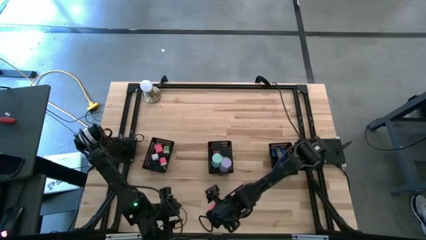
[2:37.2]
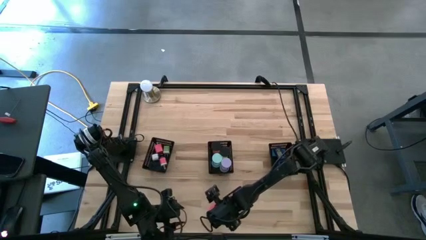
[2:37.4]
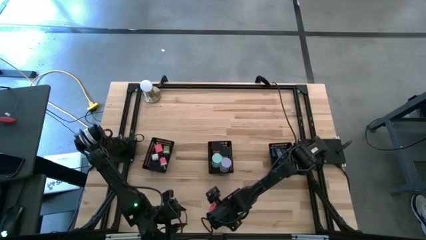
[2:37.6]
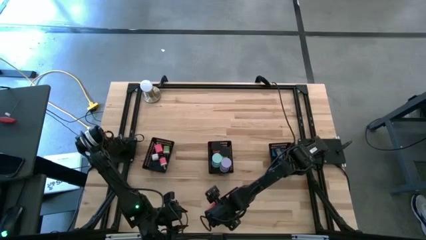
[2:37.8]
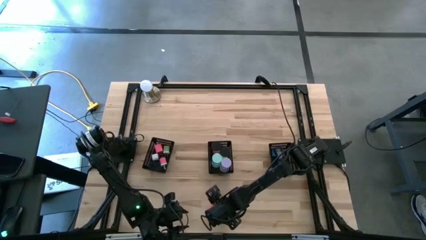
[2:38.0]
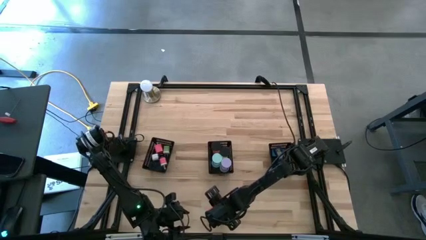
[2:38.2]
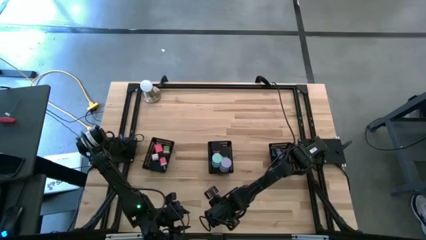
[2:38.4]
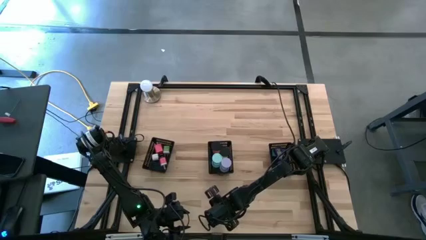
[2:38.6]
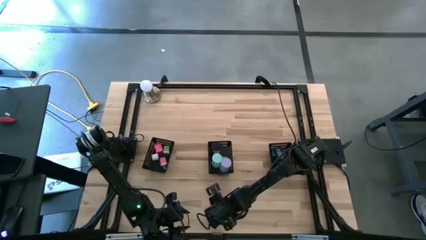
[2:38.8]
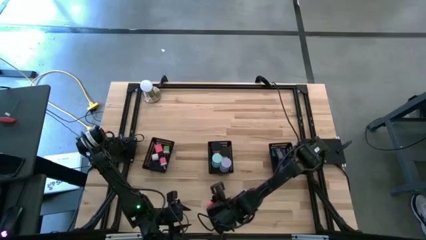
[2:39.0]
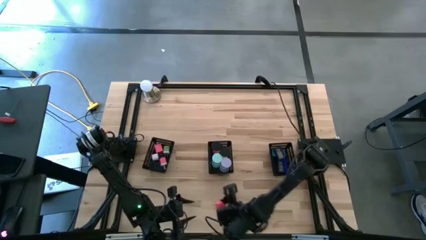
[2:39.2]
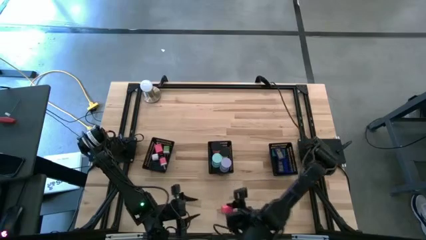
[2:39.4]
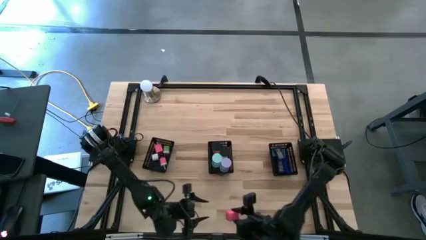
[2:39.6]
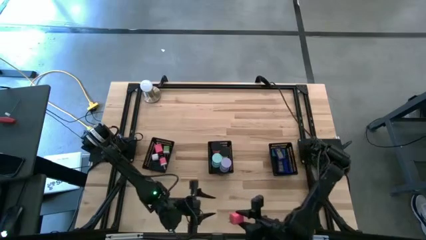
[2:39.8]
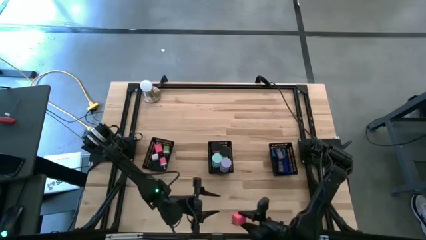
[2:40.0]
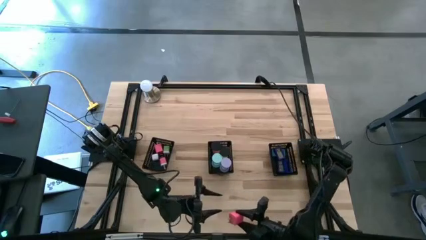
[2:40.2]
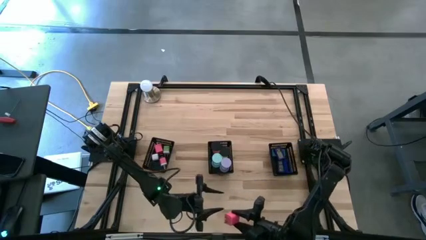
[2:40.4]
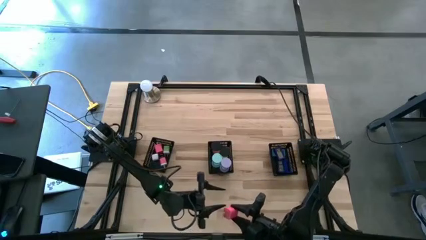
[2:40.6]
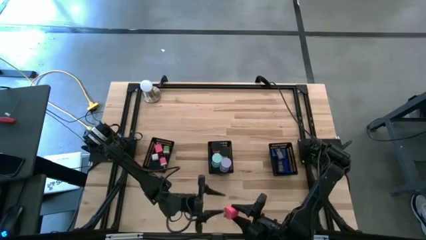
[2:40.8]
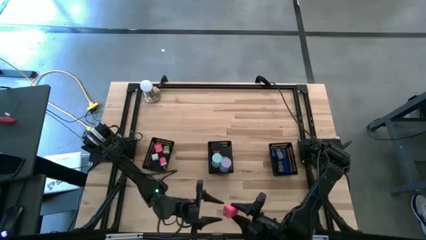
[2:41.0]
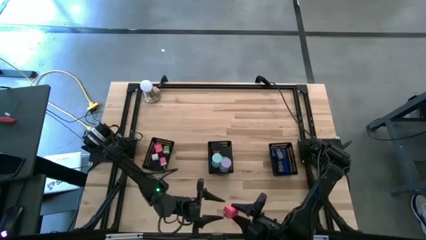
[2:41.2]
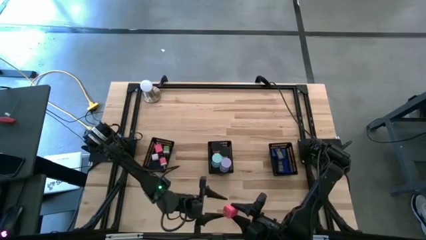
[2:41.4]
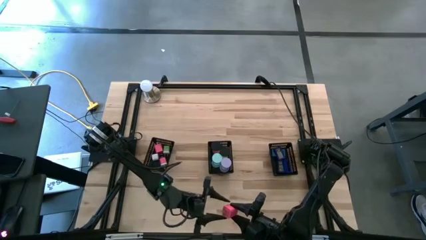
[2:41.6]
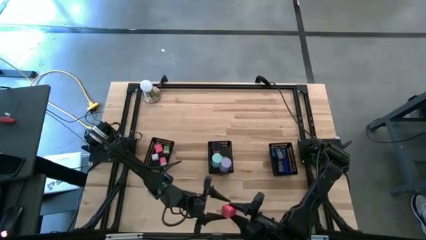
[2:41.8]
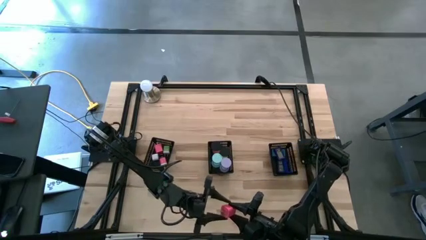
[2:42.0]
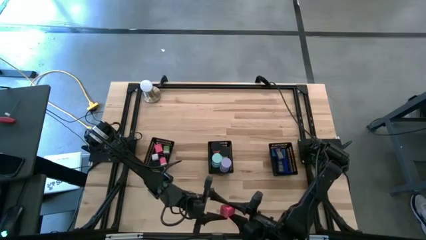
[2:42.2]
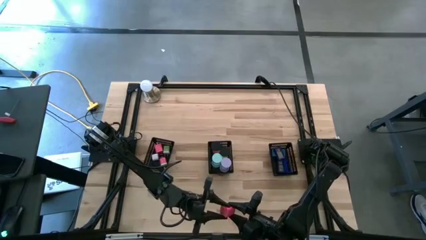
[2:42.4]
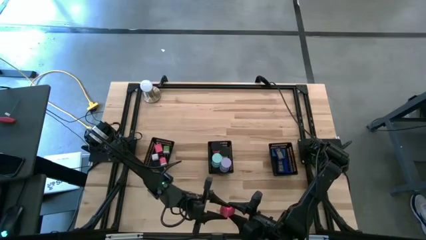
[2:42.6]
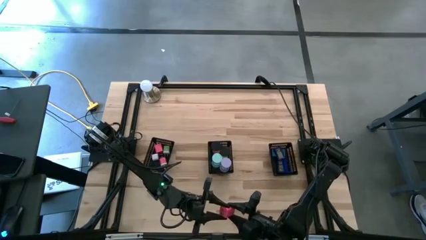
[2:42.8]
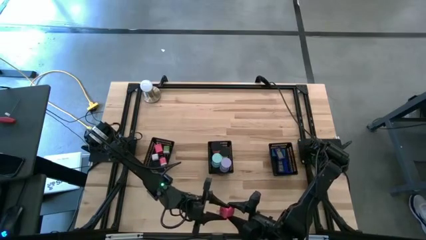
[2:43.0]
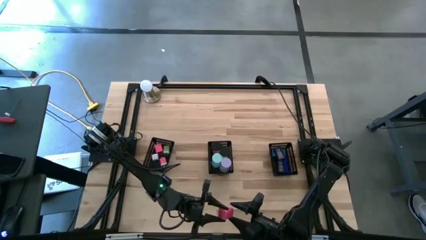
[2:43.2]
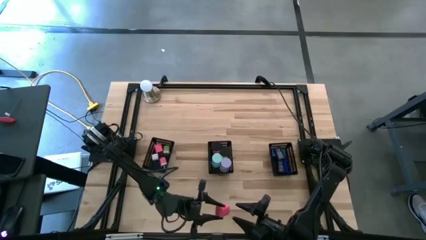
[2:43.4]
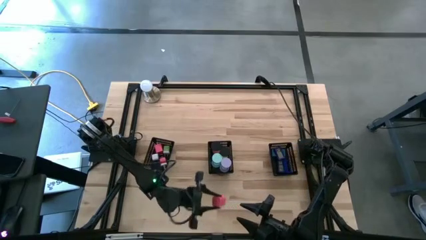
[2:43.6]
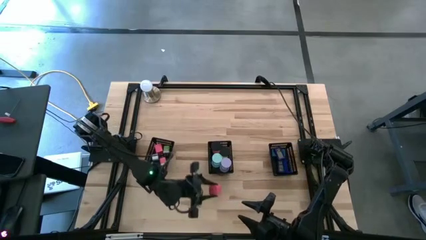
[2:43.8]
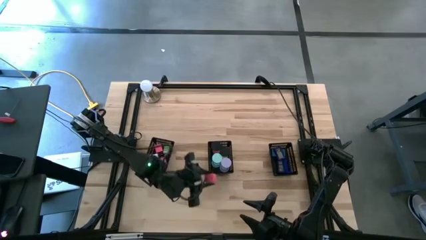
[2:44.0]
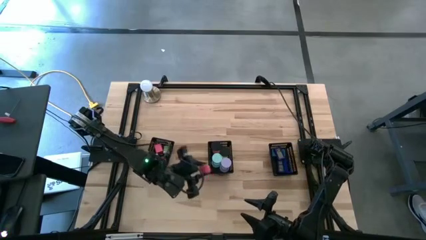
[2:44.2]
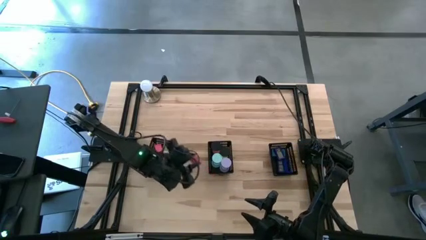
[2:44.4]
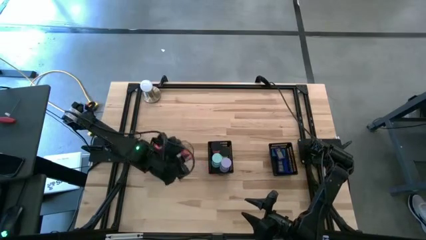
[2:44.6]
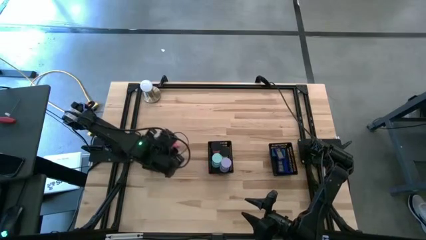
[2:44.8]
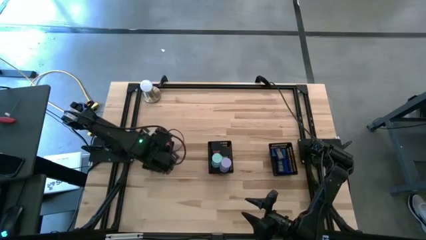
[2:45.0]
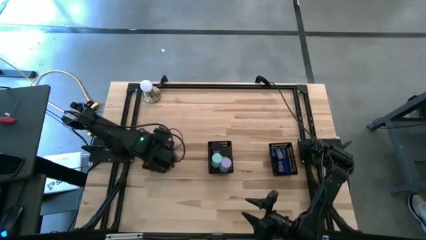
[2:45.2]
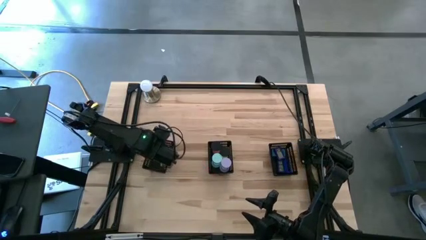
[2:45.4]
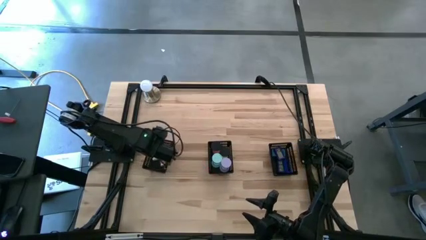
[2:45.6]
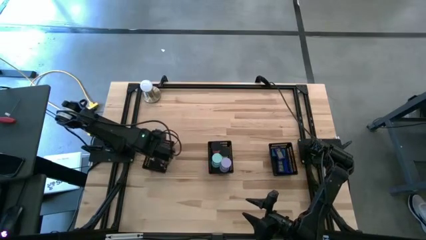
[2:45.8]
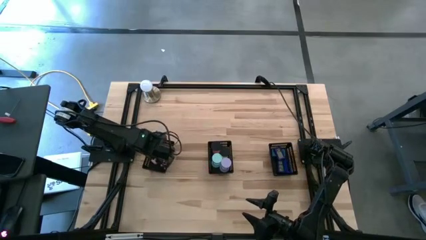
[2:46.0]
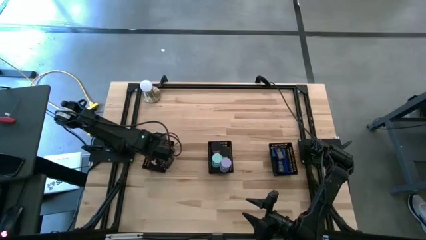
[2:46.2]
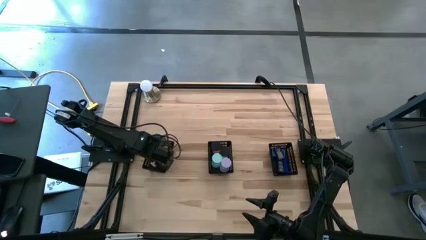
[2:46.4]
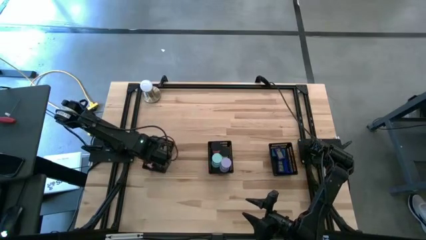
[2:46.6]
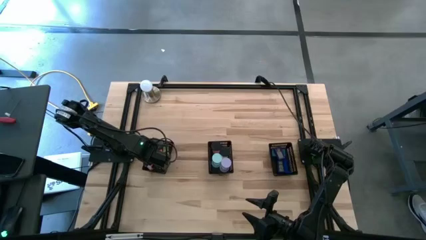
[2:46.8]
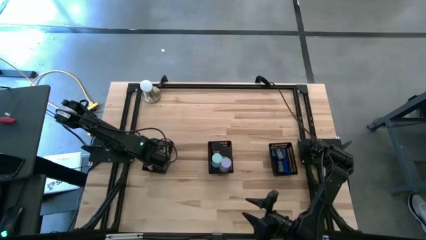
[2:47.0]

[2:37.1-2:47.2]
Task: Pick & Place Office items
Put the pink charger adapter into the left black bin

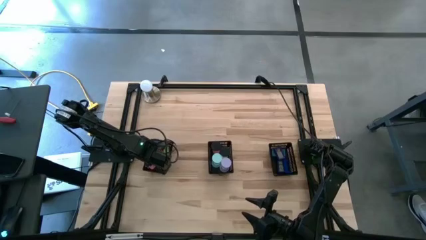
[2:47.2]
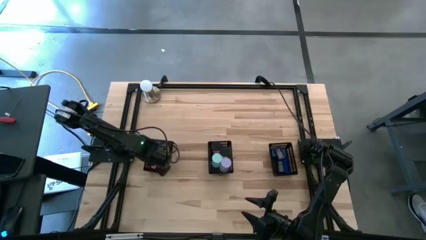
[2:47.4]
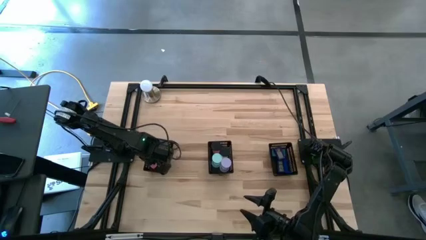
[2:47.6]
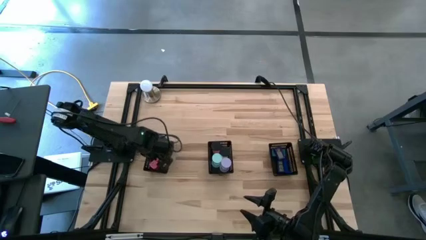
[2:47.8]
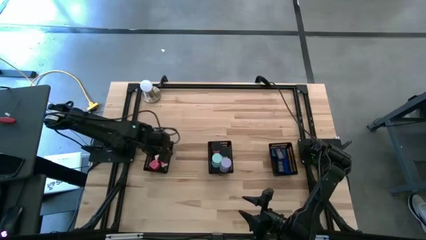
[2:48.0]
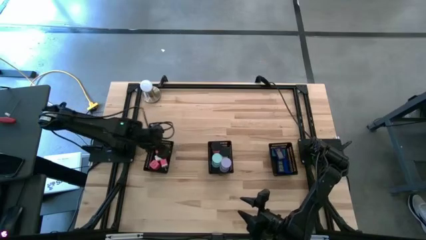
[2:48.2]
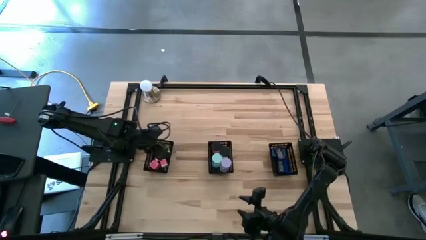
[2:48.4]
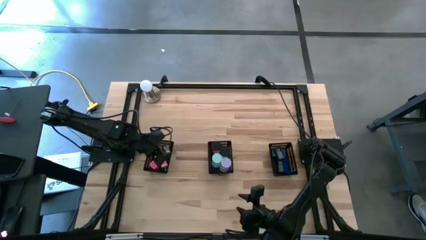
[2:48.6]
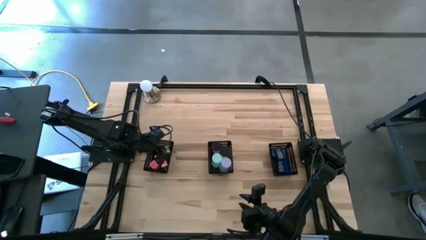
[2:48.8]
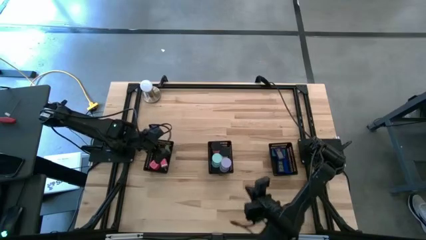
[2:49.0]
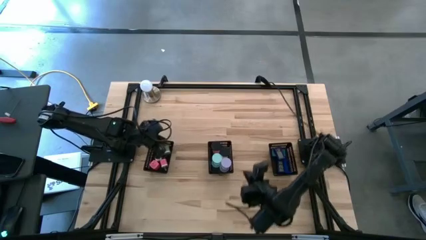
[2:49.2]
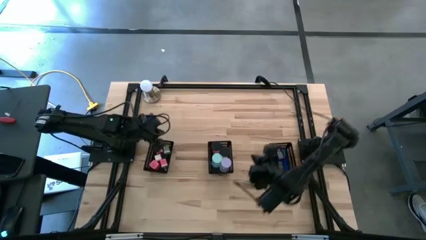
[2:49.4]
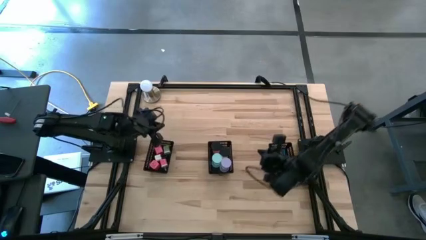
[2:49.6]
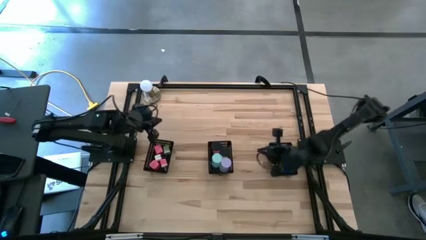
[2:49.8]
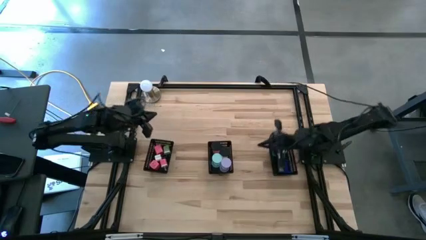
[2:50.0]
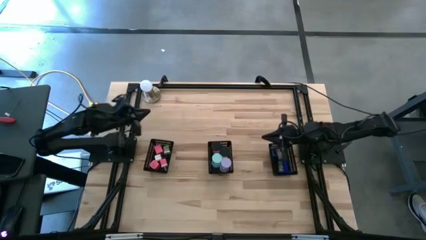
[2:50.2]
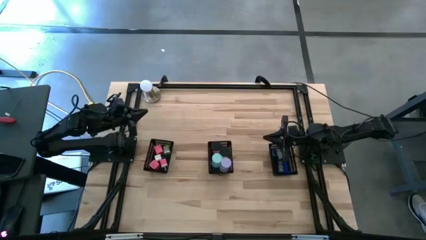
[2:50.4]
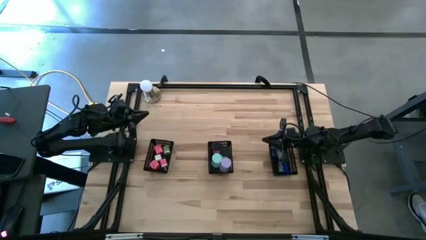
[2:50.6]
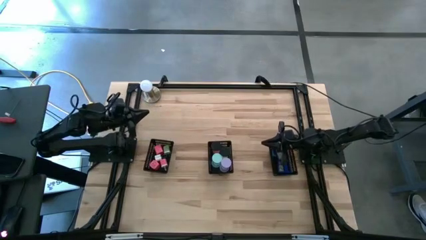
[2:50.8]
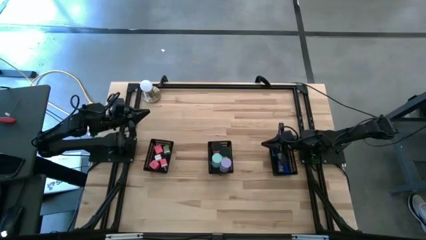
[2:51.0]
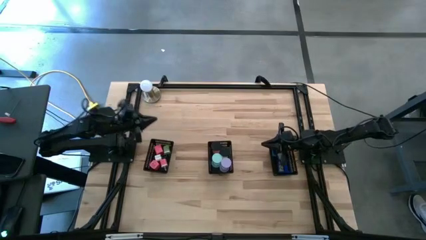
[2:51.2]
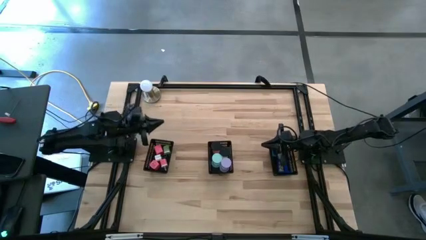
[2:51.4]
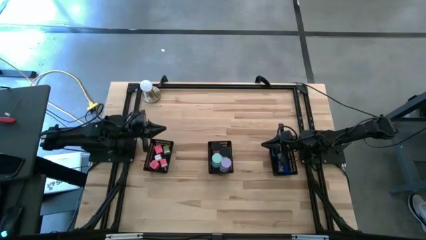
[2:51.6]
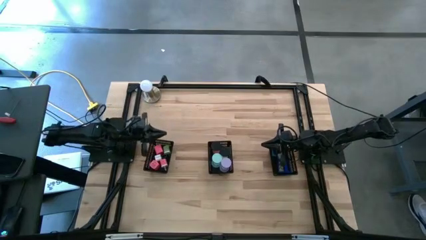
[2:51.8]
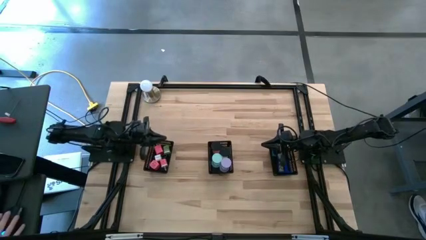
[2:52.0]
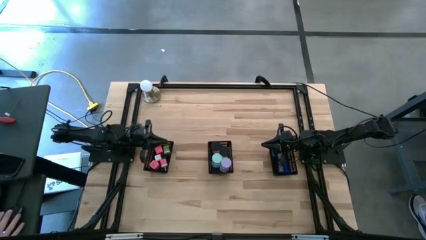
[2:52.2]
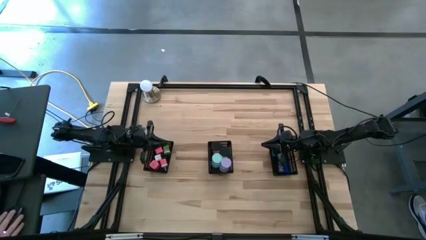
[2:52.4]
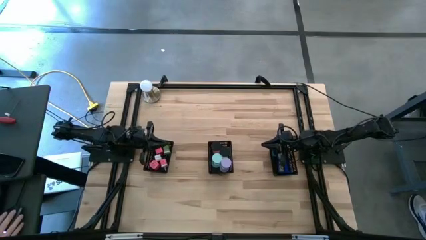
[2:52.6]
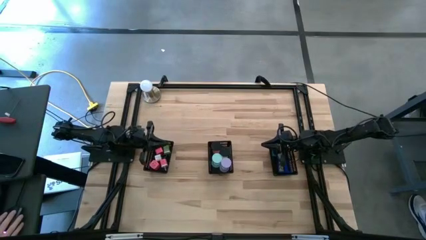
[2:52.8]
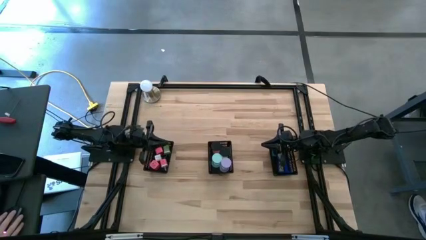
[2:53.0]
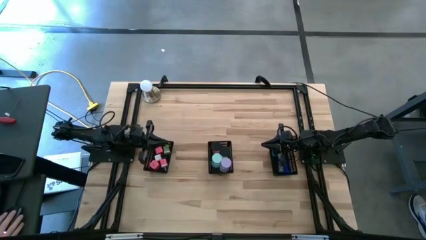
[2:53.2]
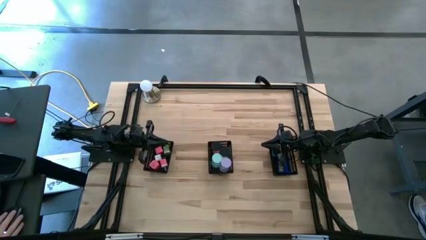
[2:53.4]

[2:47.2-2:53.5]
Return to Home Position
